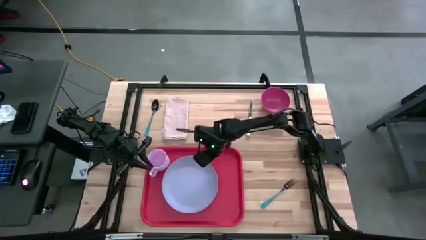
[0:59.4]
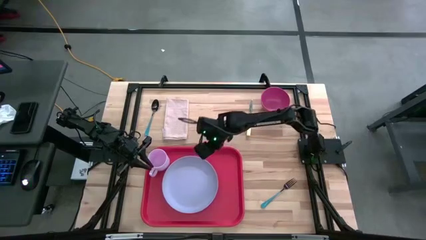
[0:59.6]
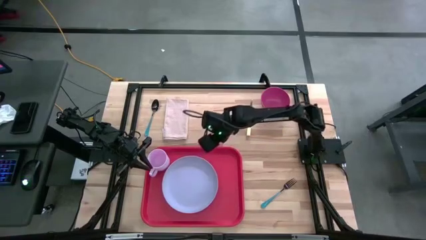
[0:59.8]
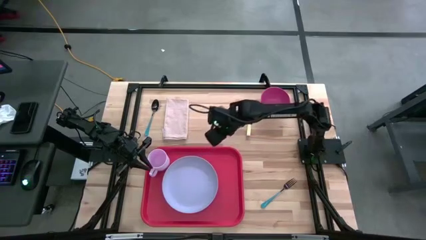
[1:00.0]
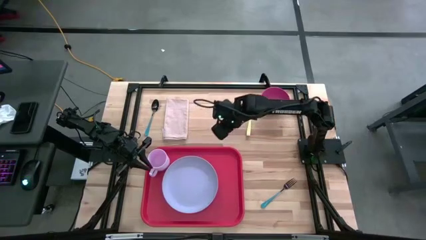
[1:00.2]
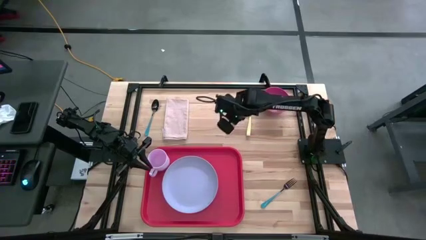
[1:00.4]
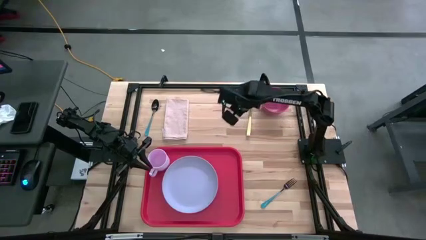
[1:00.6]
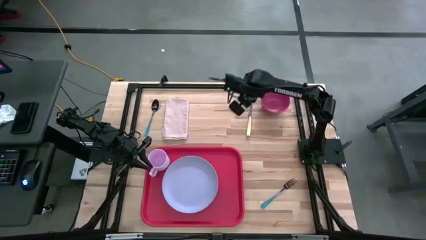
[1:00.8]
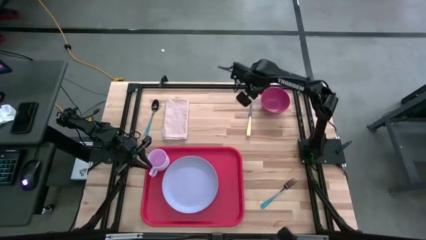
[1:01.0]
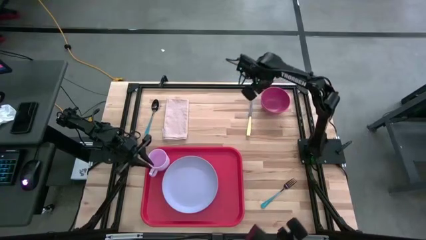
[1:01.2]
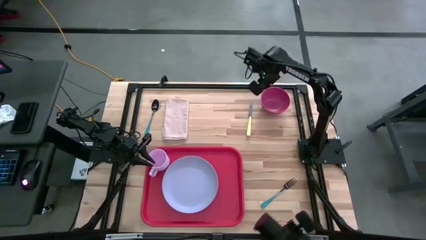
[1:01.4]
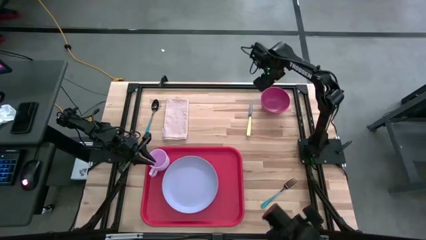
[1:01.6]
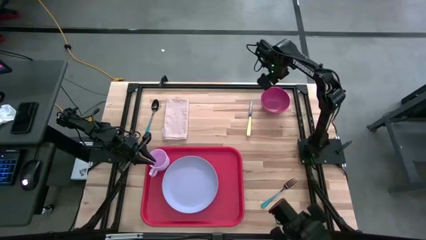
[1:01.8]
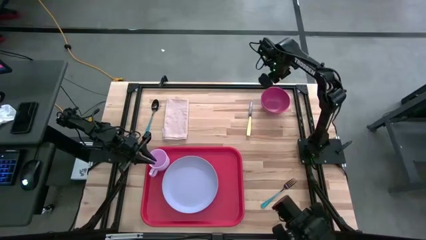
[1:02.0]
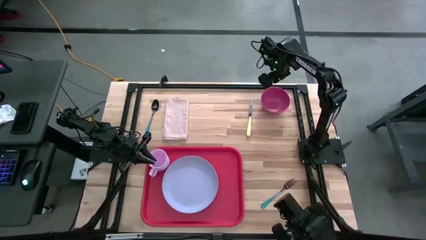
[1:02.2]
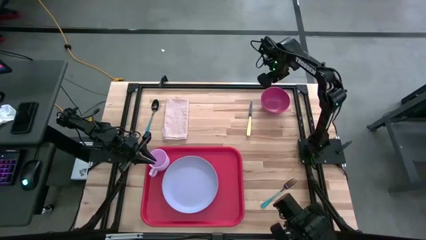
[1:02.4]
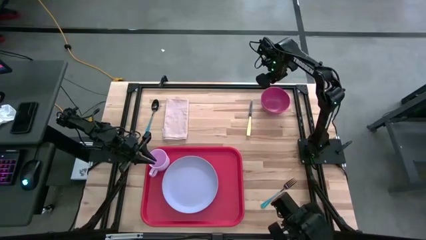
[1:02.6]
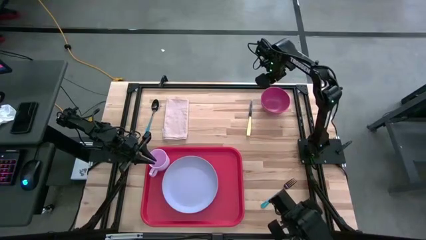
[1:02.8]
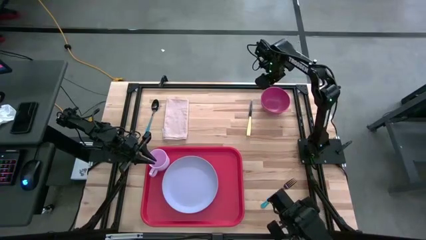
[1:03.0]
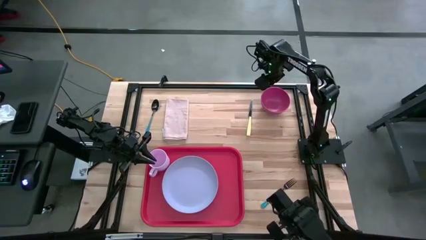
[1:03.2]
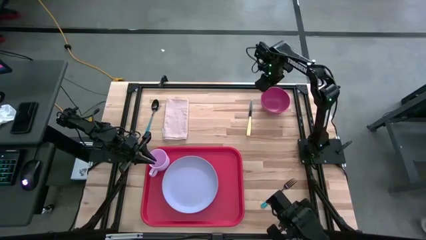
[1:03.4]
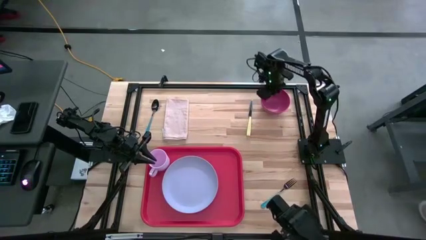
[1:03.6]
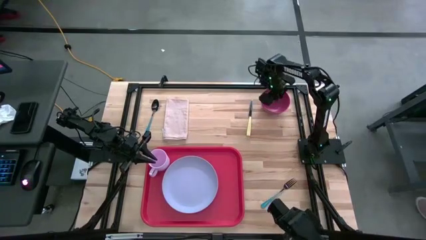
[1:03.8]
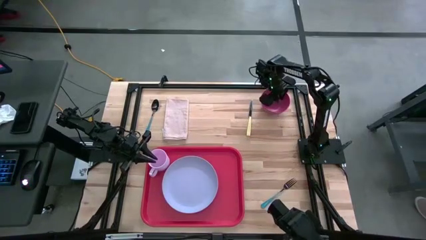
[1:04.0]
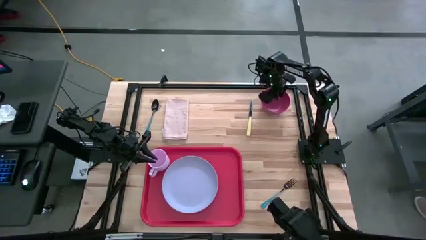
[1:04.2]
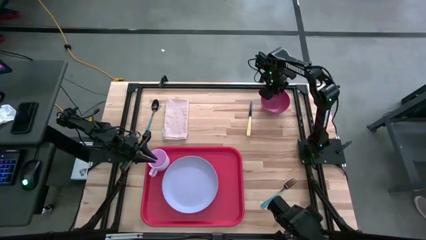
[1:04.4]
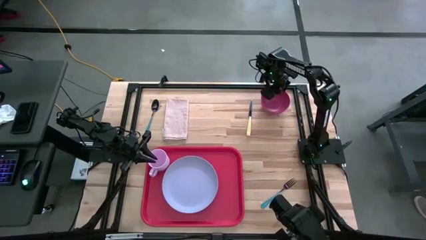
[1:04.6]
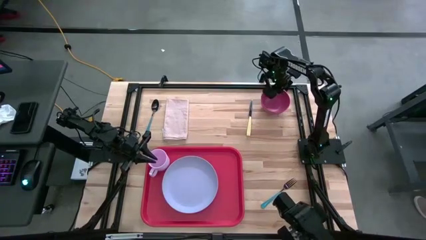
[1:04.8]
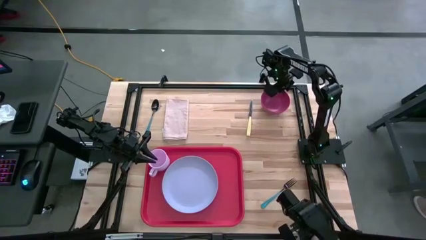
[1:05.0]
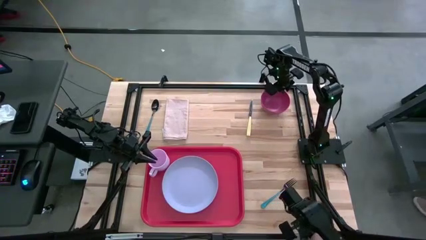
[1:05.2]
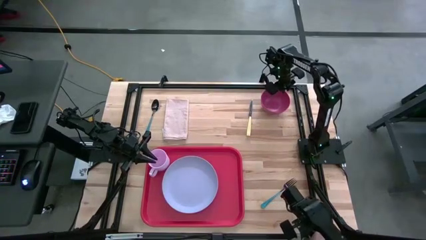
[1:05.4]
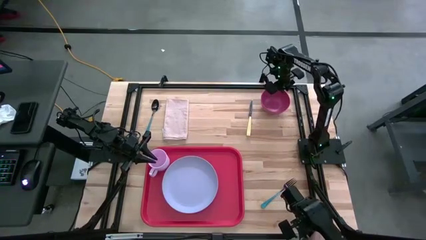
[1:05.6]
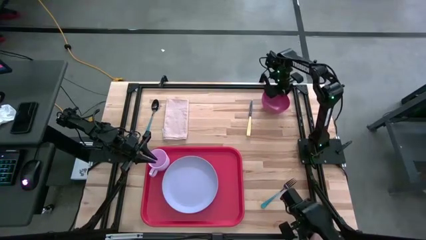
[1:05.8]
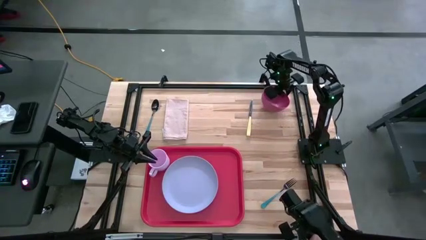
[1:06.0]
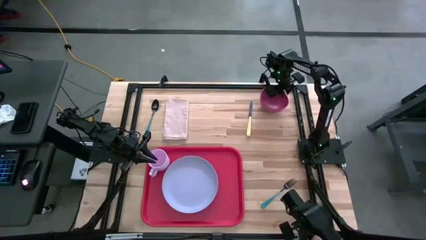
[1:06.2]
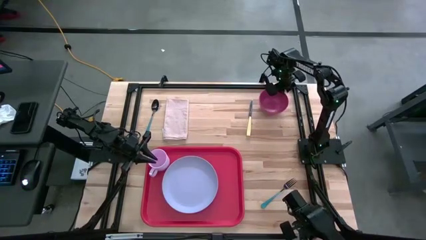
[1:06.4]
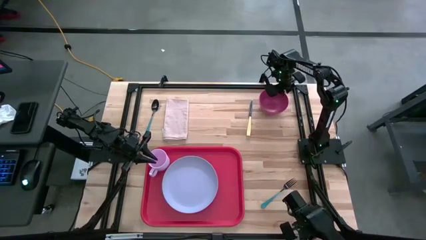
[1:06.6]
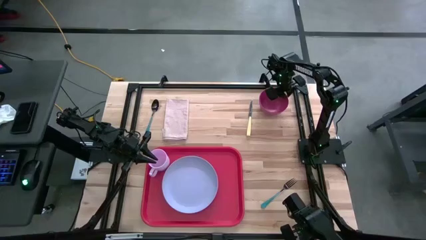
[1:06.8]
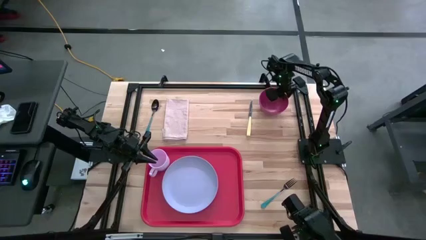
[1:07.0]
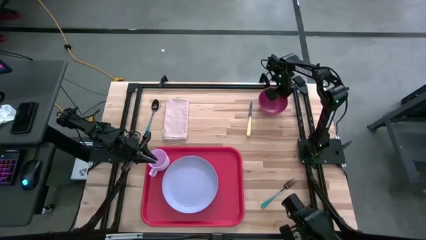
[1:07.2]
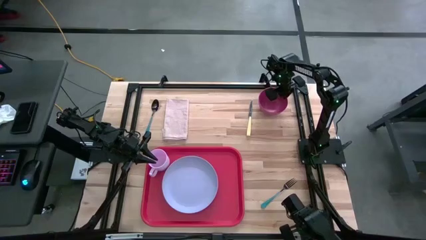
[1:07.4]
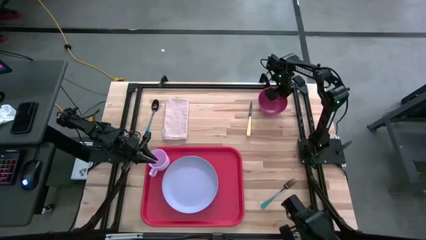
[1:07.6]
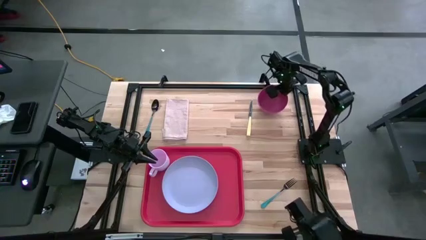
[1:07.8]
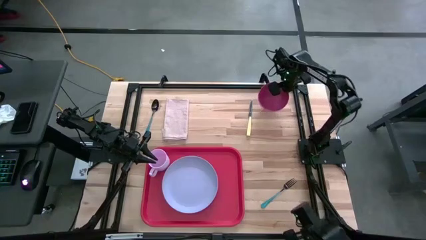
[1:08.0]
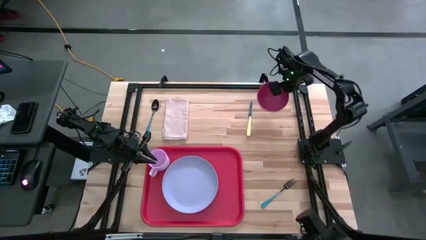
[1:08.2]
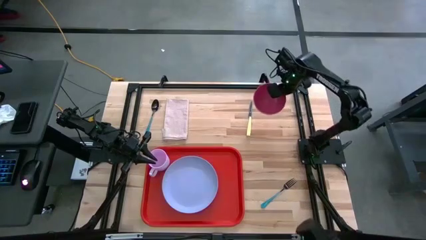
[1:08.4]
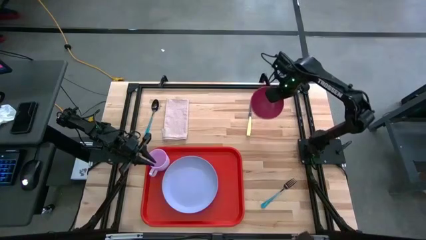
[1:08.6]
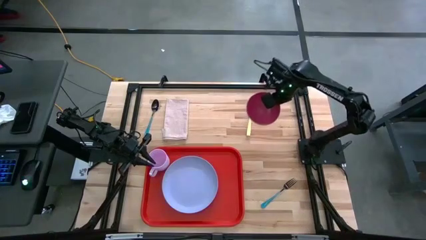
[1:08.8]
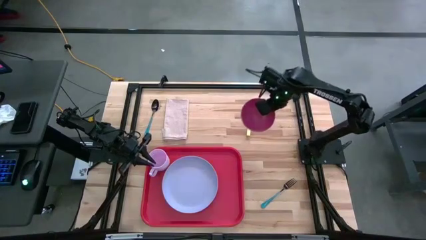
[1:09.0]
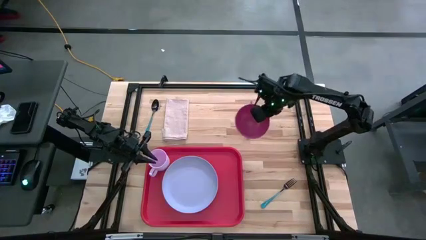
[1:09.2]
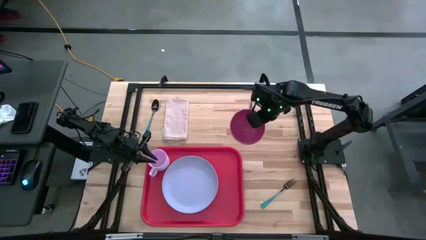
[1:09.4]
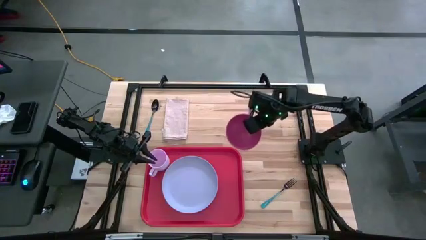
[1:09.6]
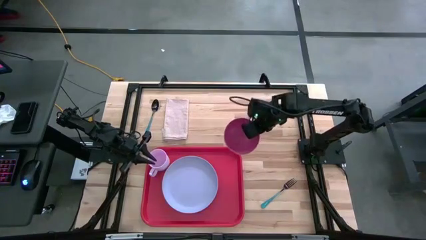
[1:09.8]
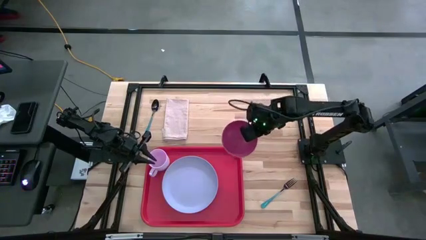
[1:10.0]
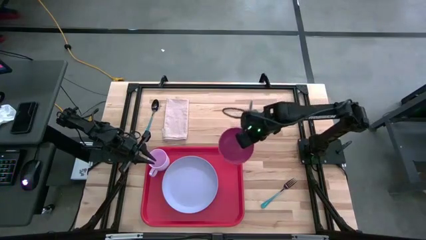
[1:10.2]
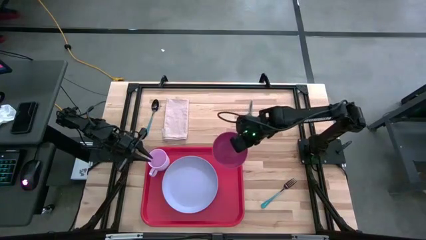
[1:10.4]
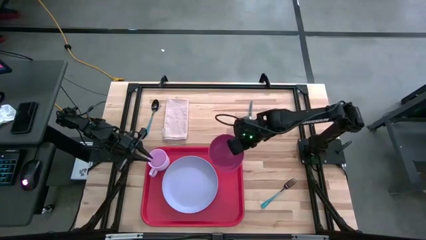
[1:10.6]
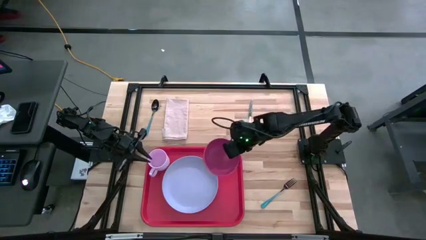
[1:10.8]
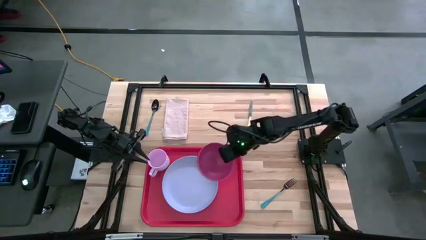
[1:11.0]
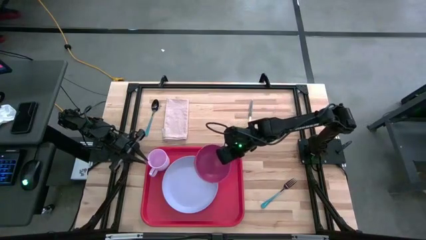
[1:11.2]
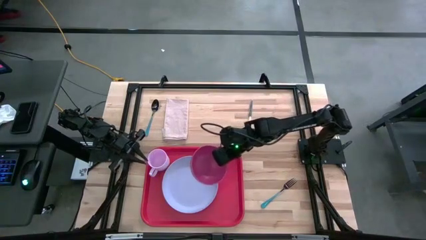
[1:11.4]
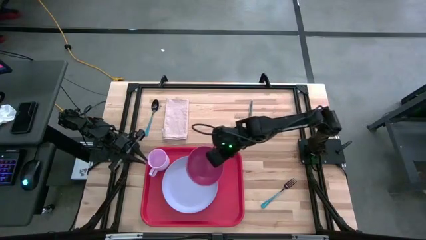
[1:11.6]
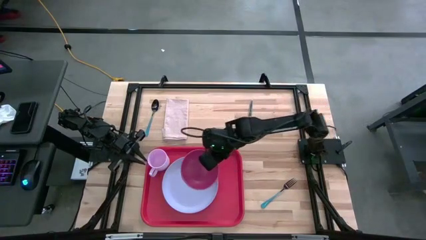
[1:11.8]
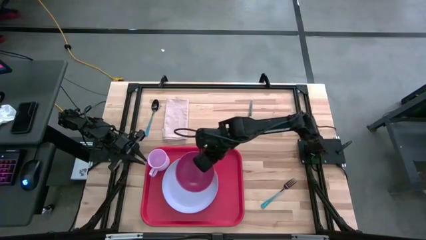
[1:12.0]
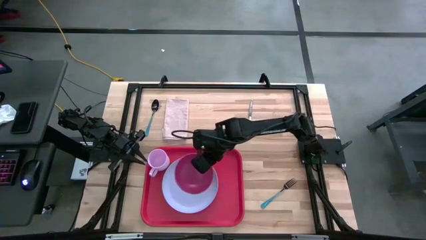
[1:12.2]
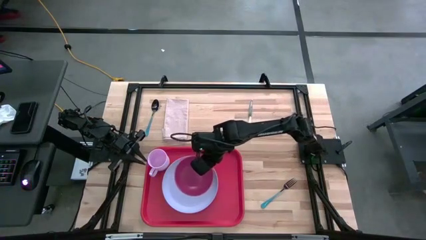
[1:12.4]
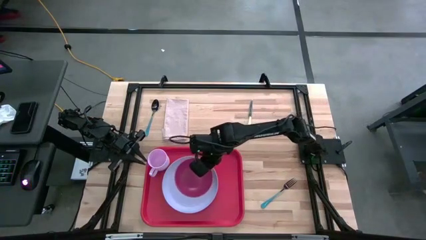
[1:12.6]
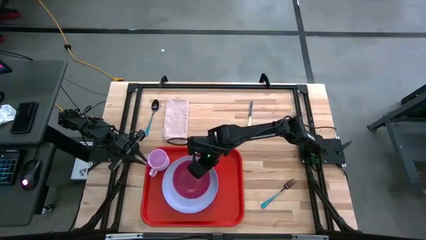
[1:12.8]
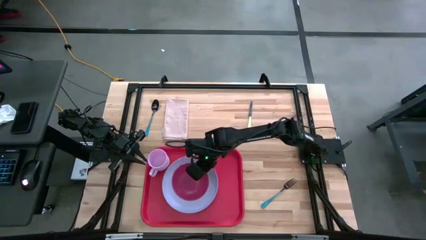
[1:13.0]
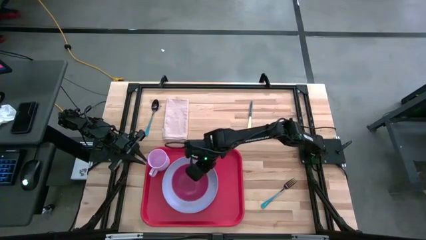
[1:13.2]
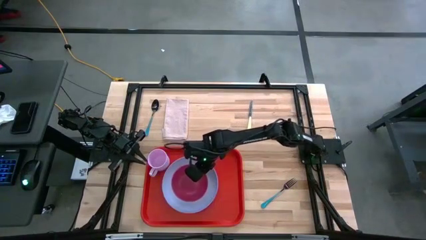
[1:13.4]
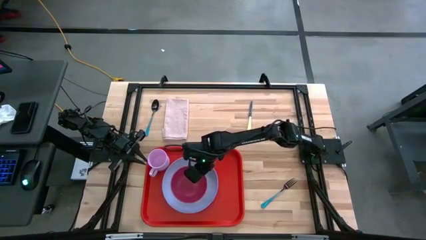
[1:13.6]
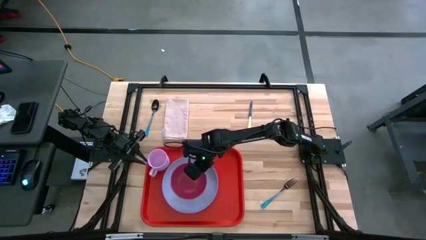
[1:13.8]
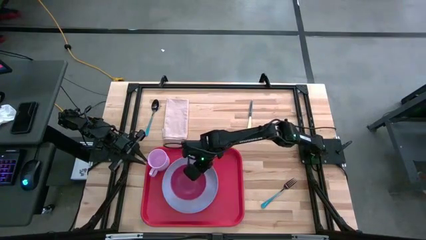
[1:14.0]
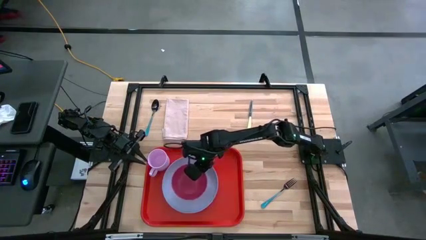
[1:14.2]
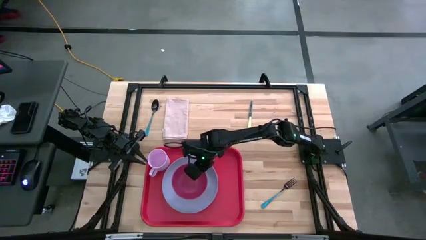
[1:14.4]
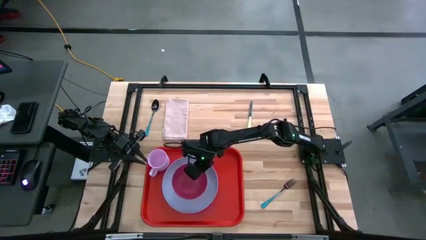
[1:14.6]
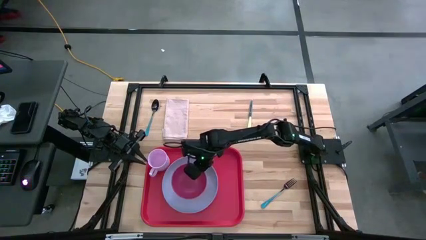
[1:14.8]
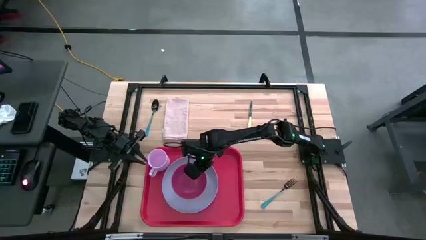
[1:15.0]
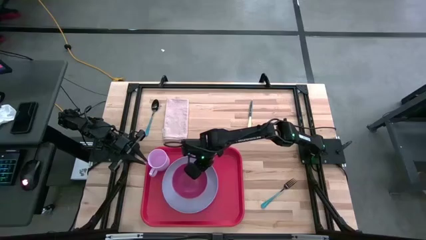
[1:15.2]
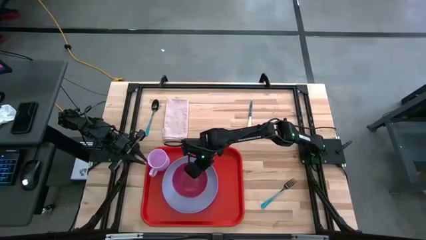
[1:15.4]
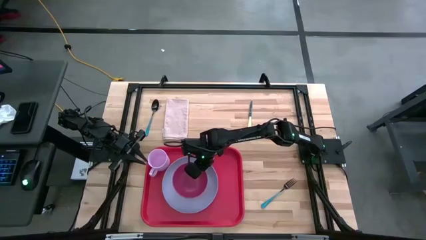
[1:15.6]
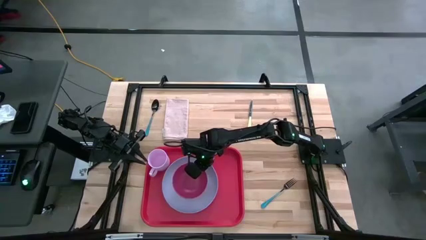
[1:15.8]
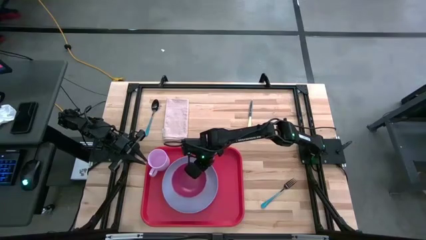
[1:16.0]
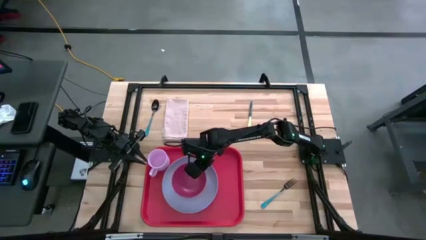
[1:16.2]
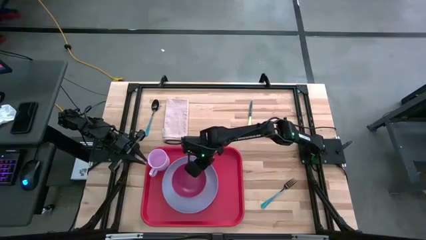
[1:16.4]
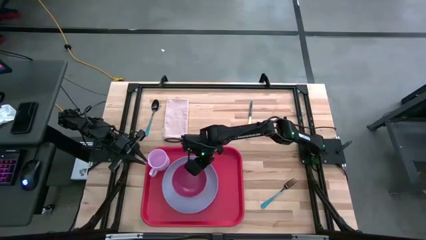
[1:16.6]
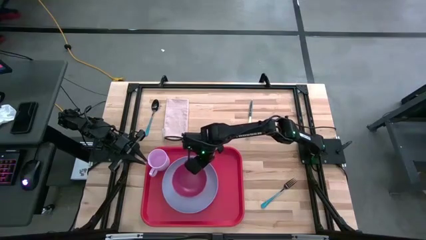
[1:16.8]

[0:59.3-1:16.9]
Task: Set up tray
Put the red bowl on the blue plate on the orange serving tray
